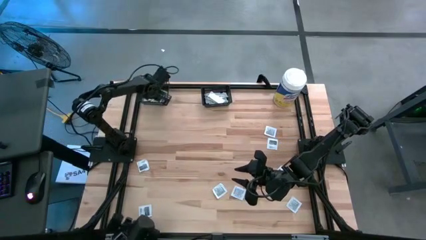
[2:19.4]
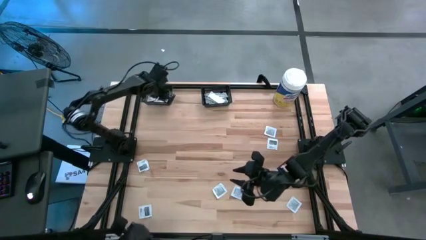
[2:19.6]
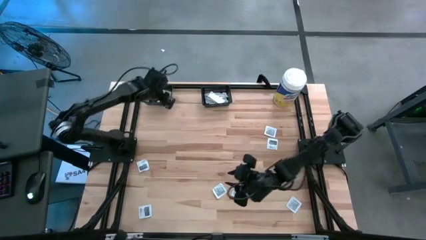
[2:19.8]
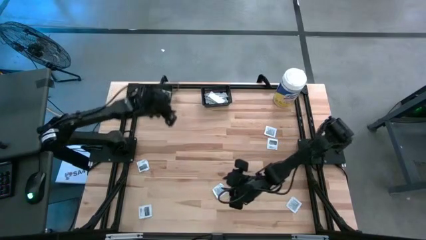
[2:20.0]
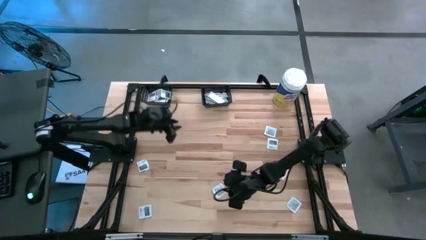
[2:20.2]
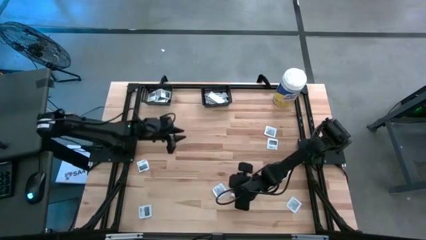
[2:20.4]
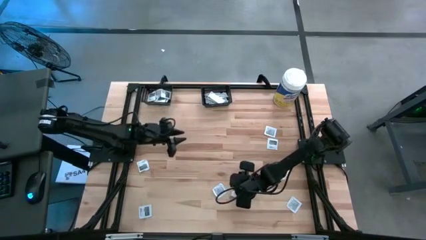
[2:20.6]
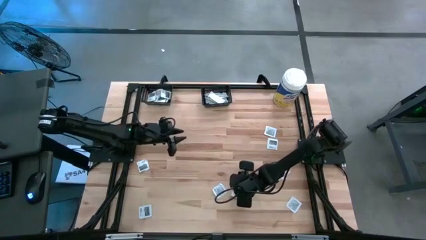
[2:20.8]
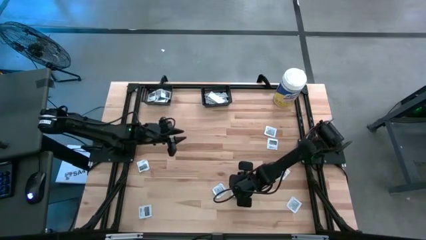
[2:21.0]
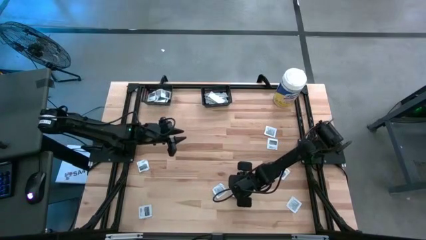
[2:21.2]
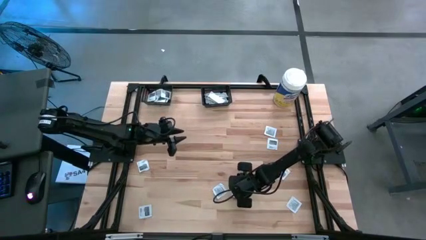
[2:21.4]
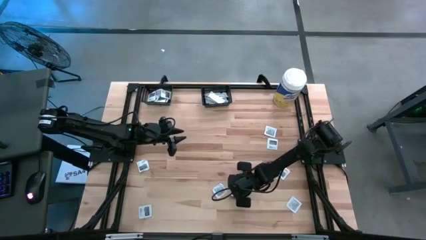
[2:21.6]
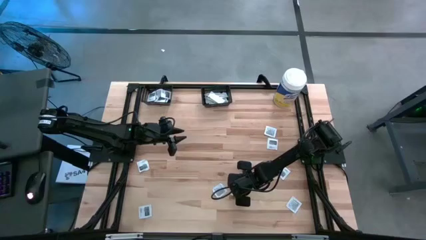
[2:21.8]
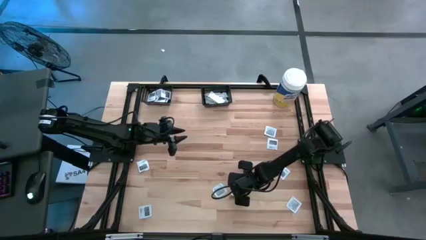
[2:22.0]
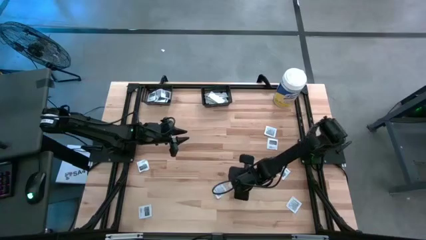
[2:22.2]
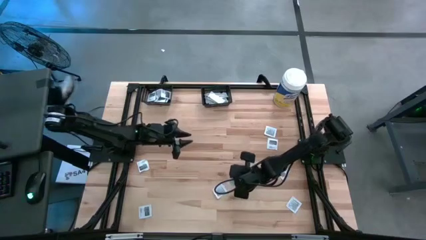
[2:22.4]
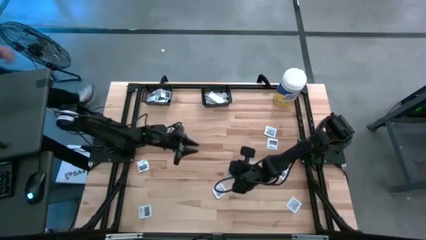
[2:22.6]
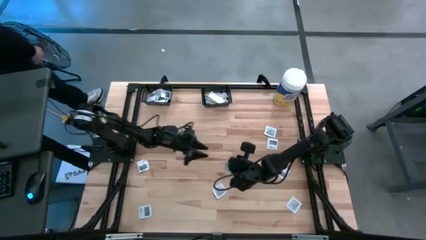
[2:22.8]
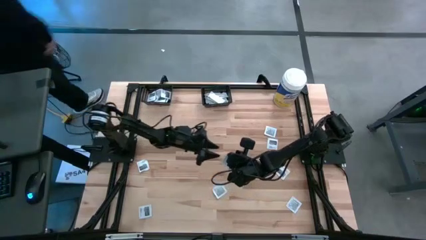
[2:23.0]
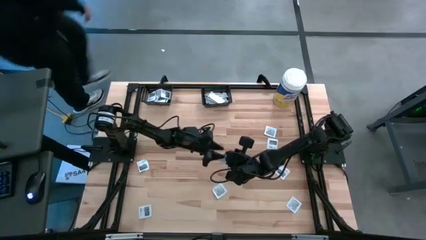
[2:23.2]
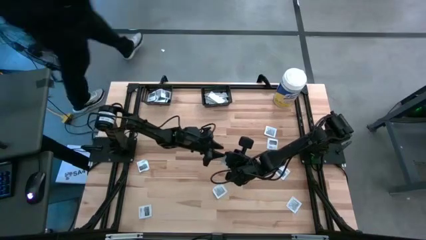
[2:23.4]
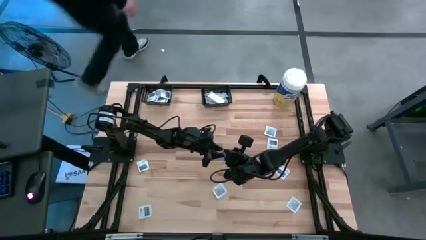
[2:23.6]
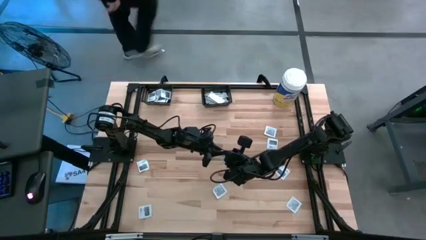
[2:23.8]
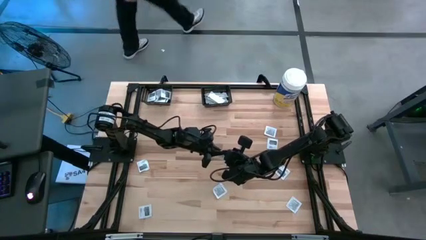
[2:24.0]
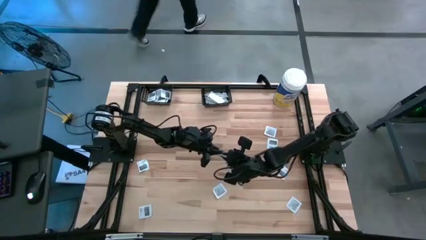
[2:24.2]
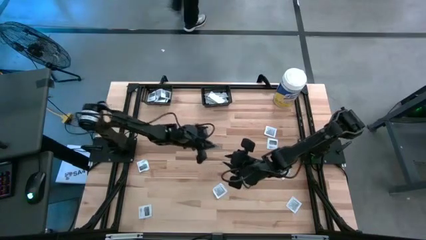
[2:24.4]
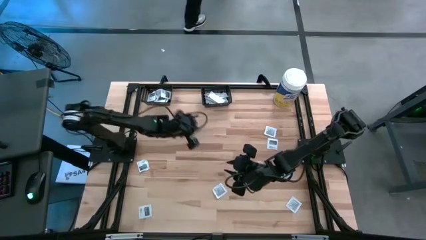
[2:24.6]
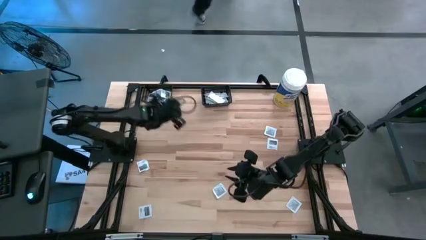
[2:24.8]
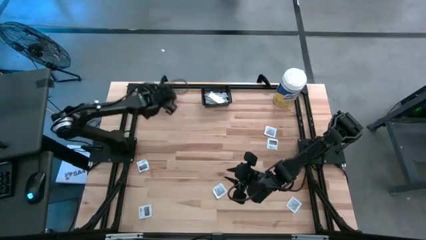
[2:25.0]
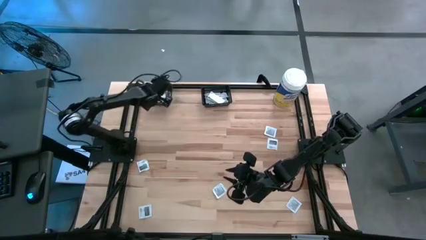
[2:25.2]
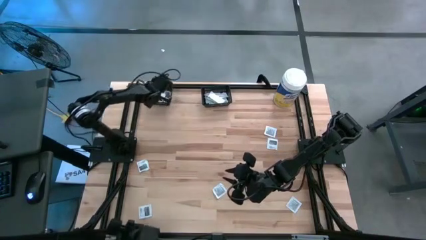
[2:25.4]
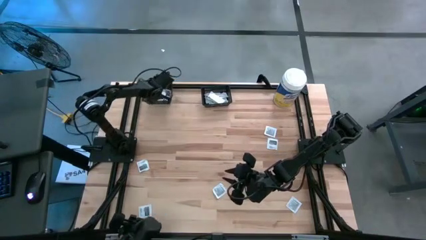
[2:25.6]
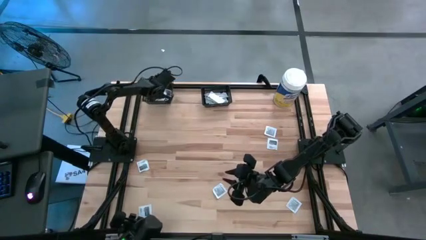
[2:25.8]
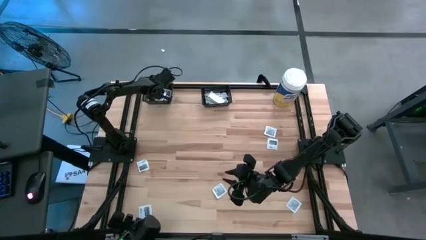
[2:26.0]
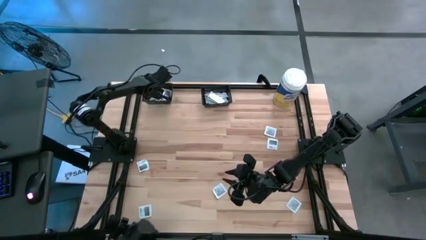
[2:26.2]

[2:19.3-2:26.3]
Task: Pick & Place First Aid Supplies
Put the gray towelette pack into the left black bin

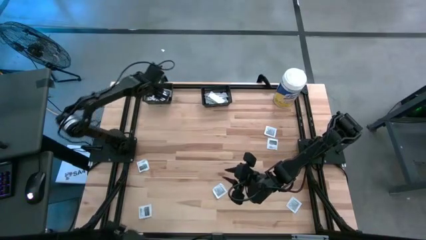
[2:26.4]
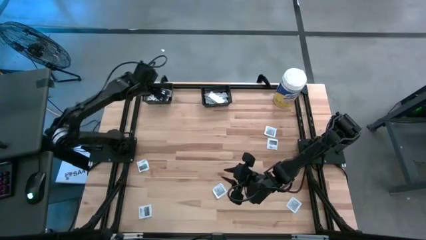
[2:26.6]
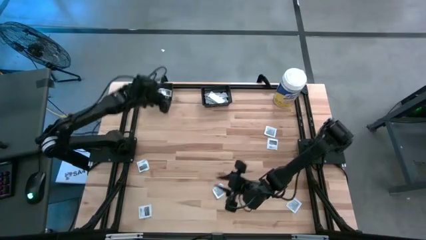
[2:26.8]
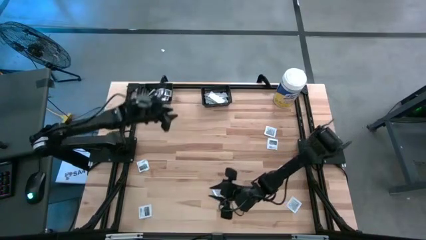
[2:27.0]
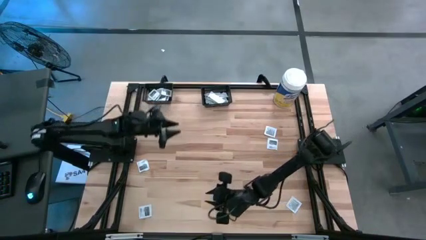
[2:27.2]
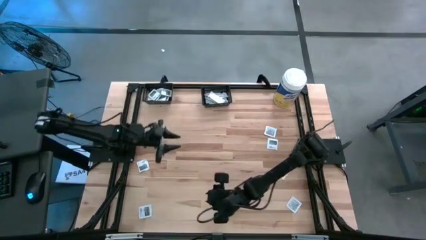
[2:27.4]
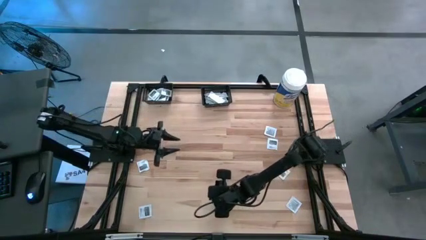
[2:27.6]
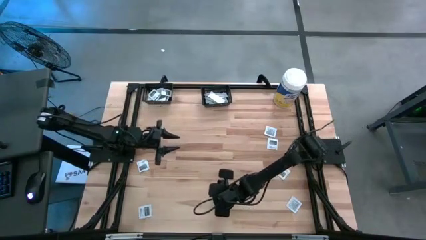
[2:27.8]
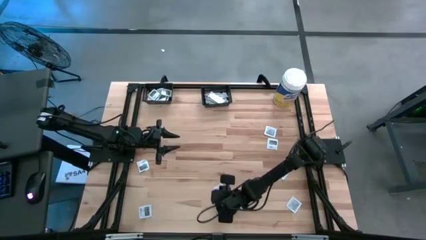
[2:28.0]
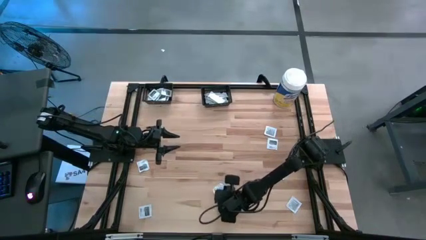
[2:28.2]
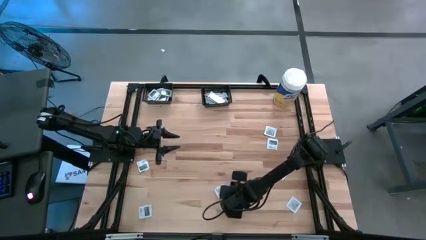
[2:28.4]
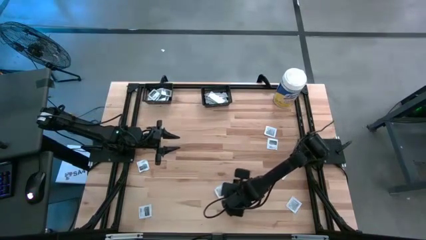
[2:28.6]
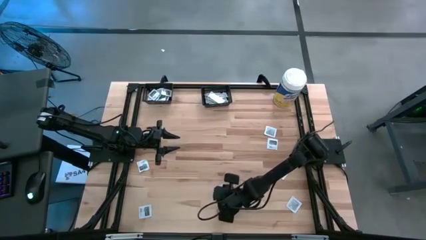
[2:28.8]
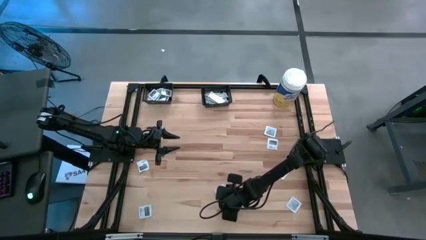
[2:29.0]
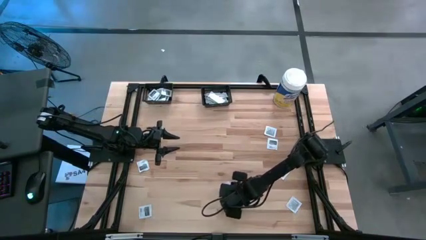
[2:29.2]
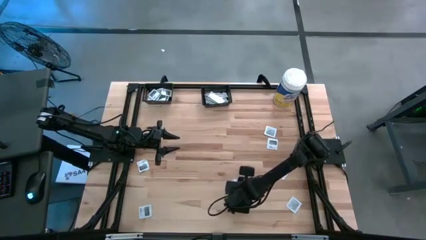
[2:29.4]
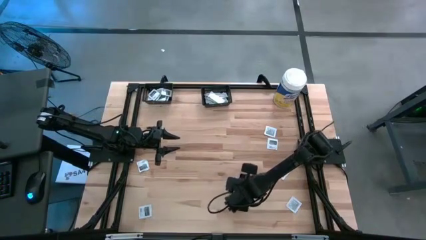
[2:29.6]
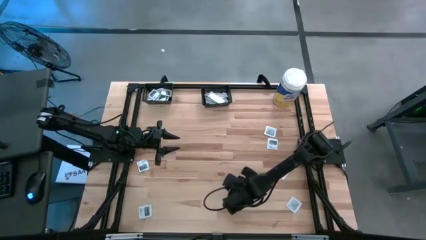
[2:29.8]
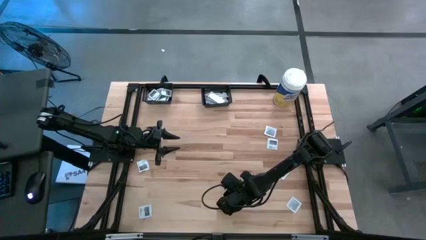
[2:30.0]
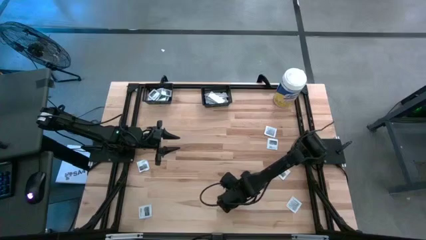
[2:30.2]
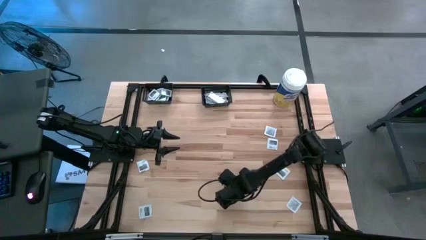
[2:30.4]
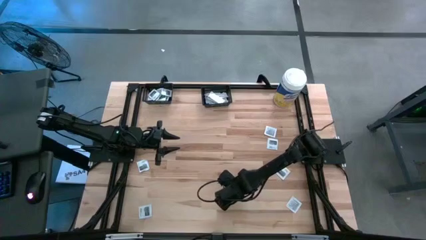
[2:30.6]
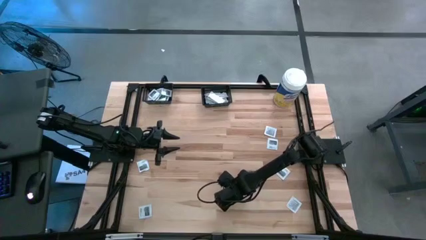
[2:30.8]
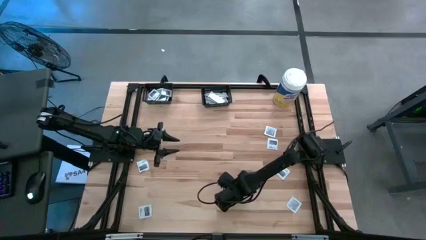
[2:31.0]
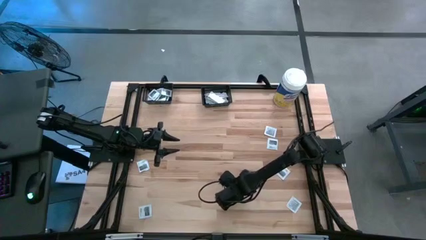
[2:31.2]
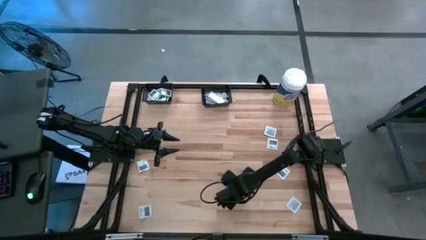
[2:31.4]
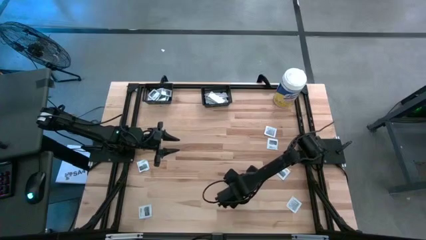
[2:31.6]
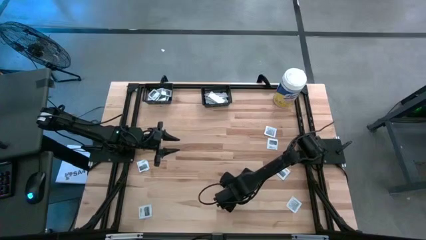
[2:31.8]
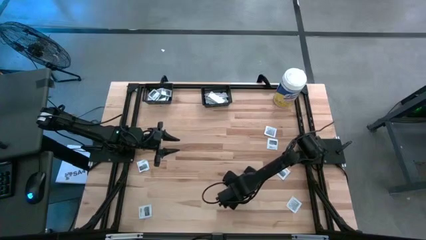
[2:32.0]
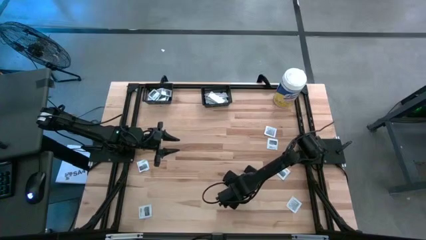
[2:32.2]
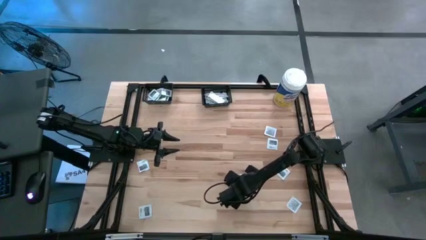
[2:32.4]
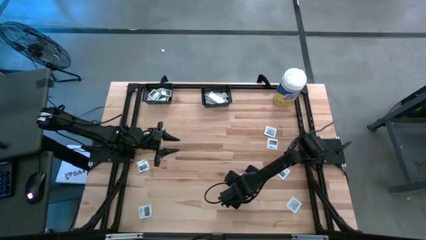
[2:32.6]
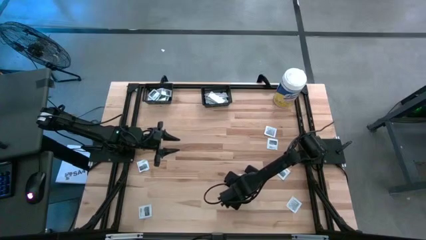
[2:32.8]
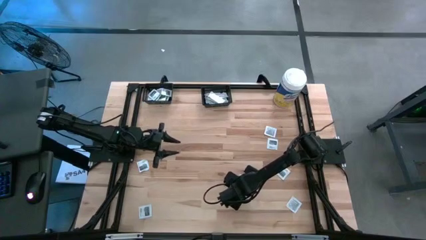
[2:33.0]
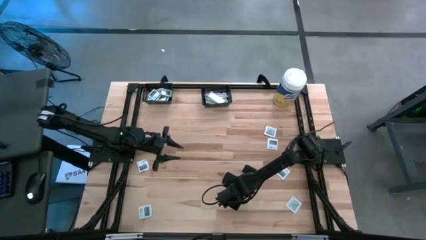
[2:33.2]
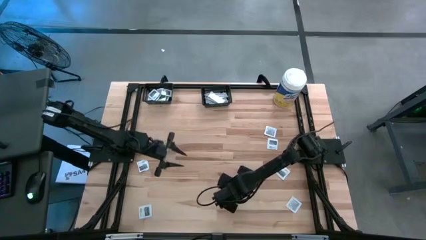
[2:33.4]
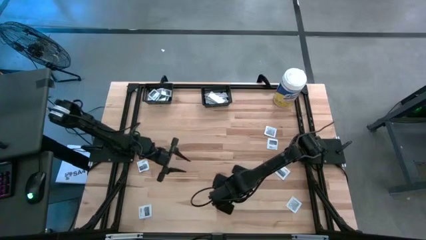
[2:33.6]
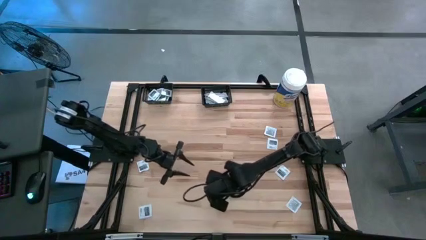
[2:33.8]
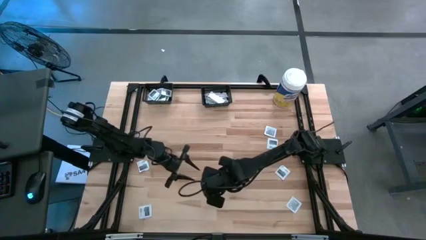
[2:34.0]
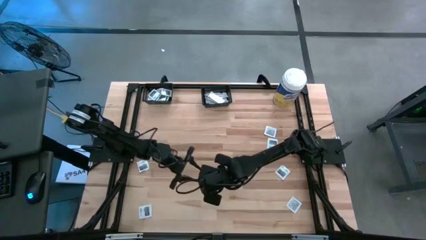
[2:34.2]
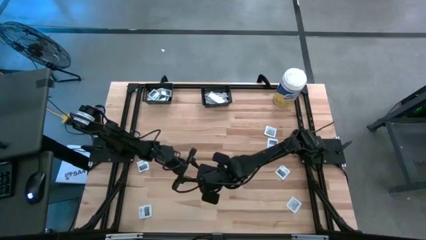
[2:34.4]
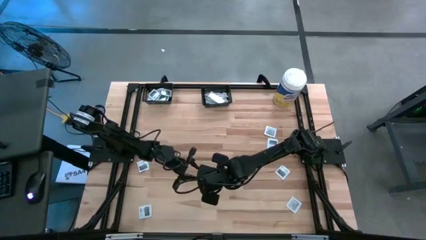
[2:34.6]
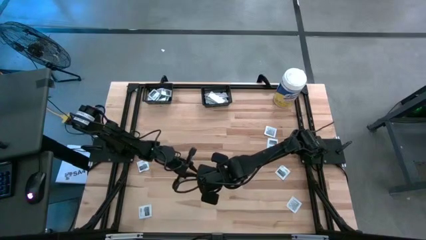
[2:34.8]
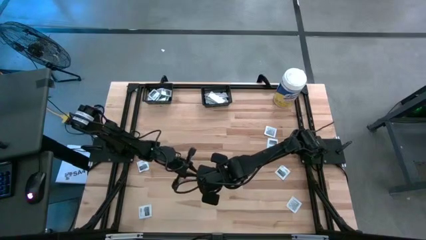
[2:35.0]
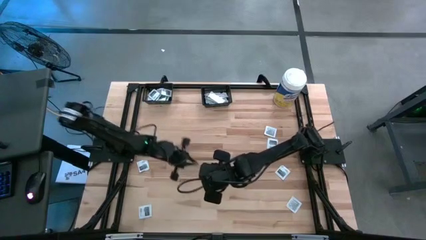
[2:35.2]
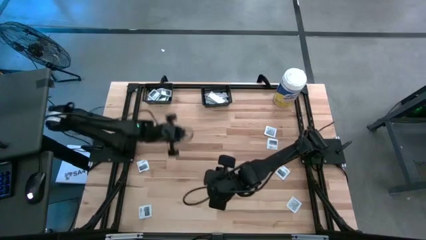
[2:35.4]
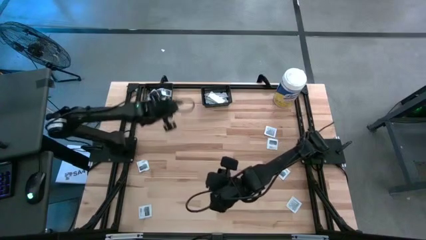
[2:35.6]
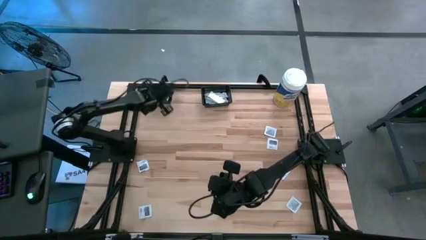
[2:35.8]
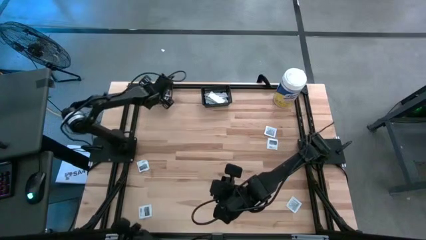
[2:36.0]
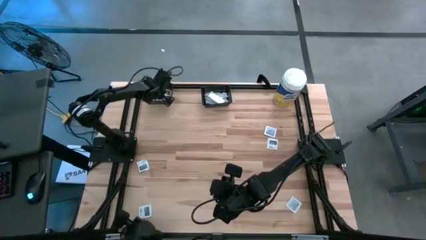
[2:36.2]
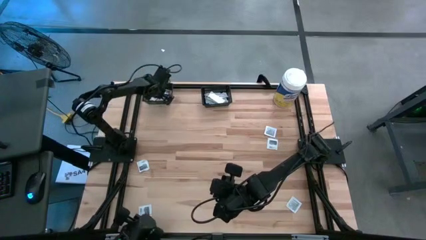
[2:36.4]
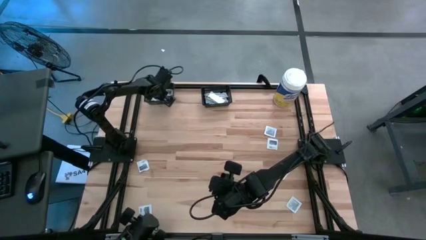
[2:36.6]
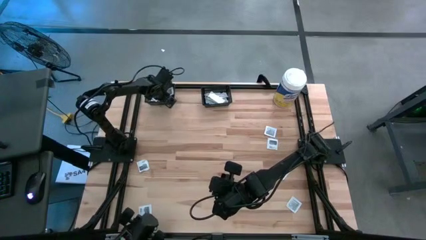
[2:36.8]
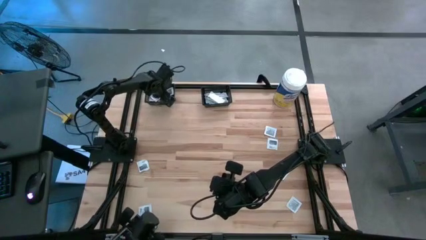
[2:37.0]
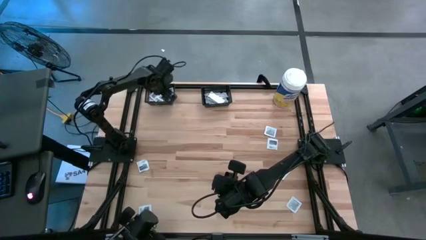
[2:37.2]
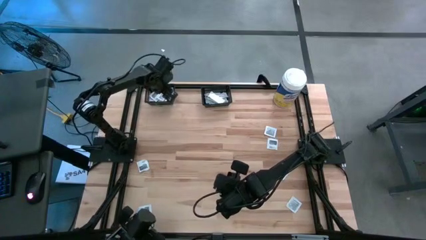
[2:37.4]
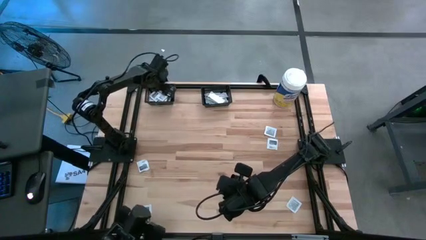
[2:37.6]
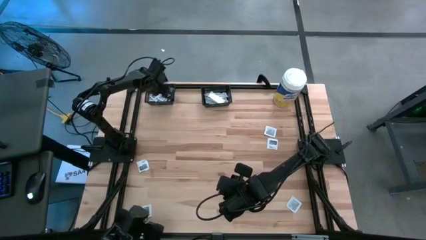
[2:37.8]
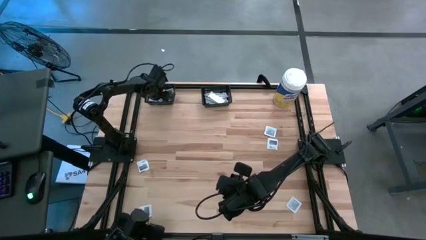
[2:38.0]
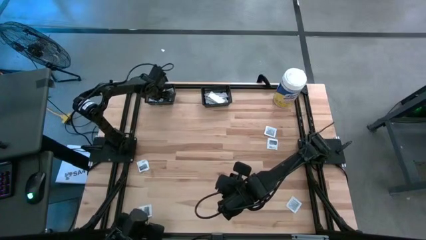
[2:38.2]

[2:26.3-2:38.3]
Put the gray towelette pack into the left black bin
